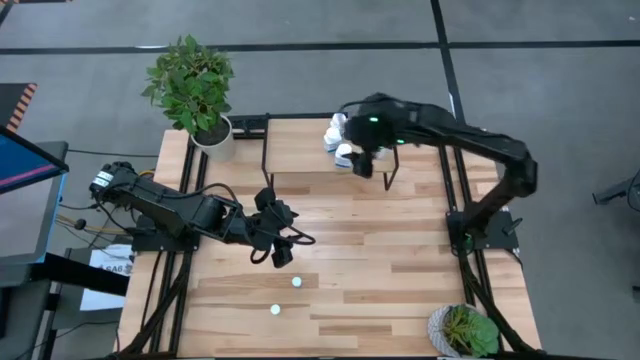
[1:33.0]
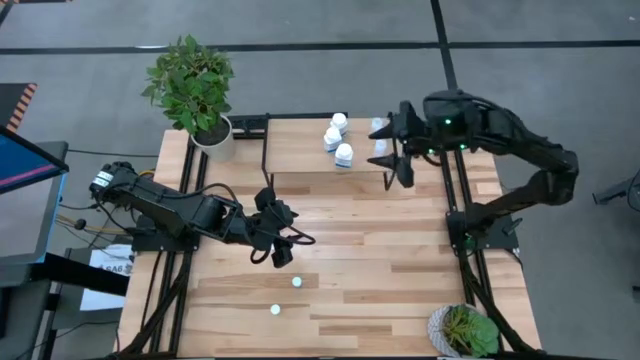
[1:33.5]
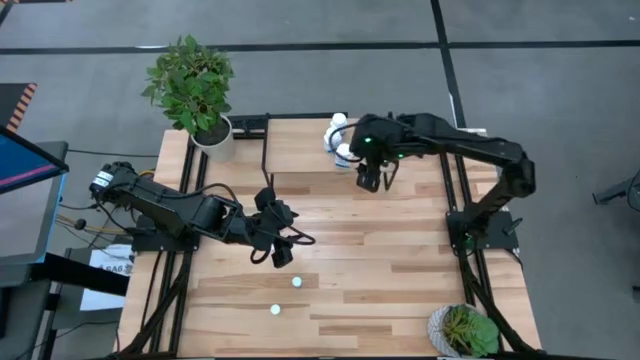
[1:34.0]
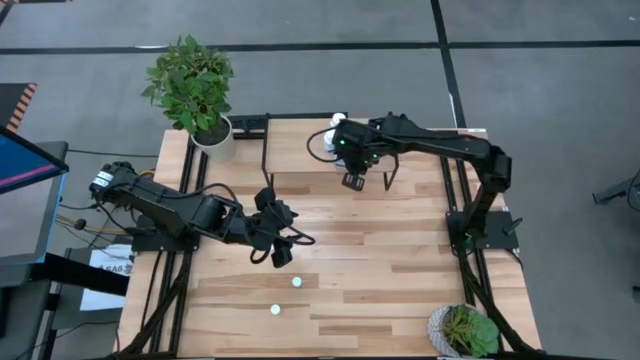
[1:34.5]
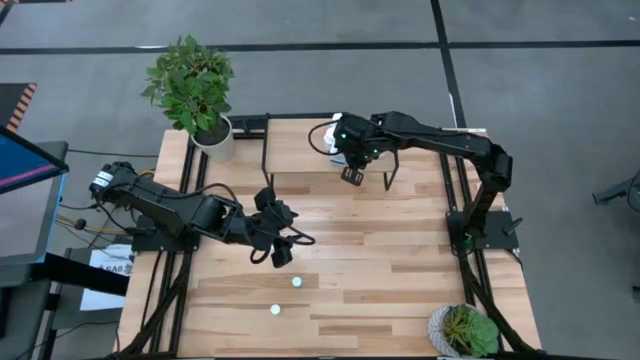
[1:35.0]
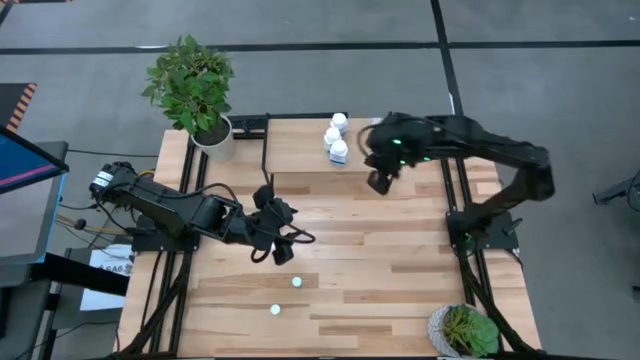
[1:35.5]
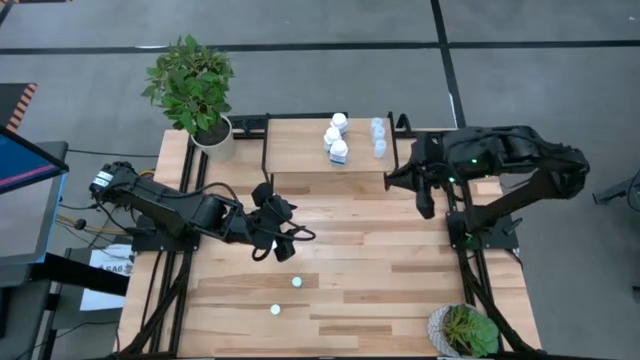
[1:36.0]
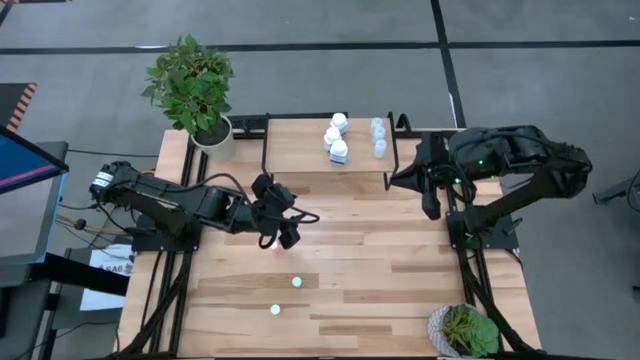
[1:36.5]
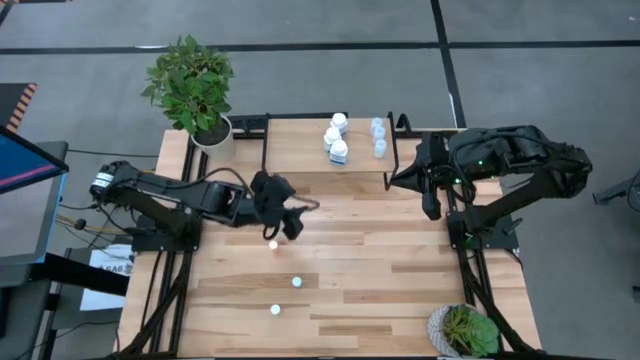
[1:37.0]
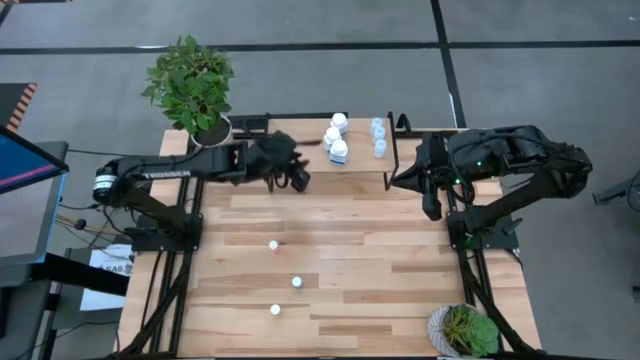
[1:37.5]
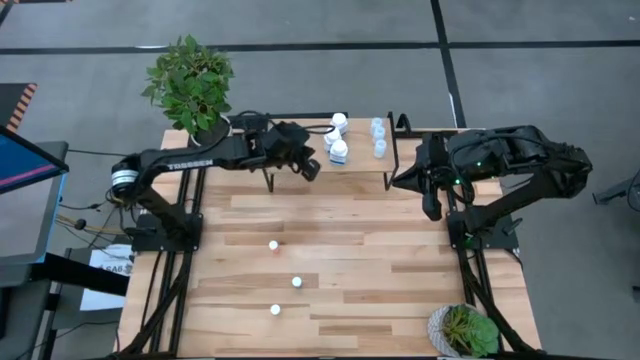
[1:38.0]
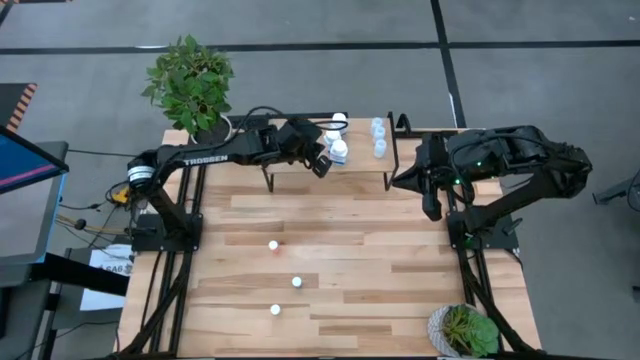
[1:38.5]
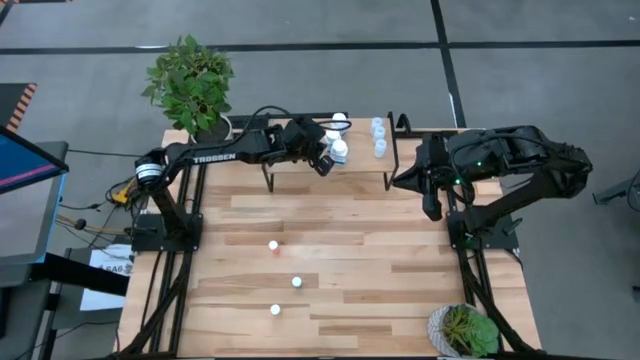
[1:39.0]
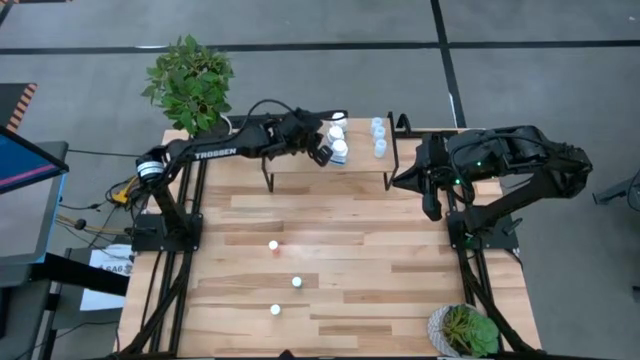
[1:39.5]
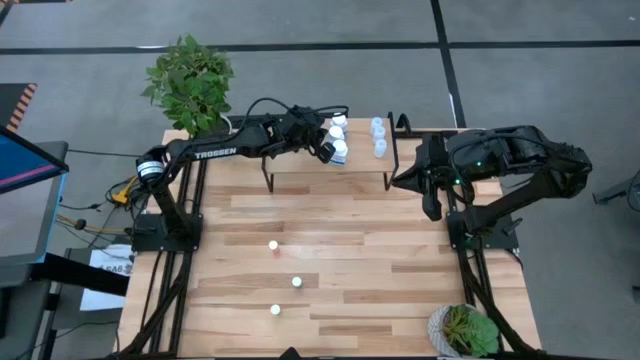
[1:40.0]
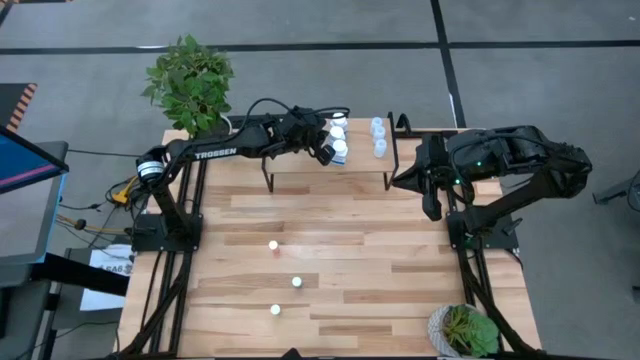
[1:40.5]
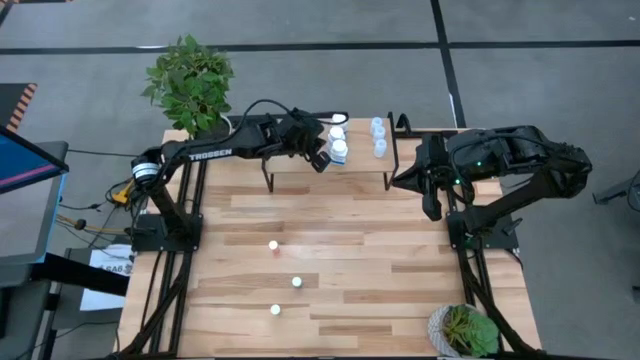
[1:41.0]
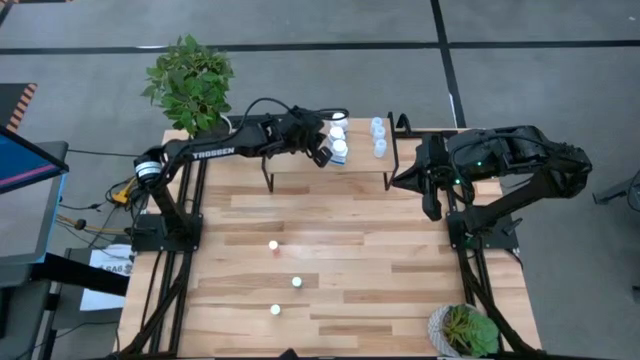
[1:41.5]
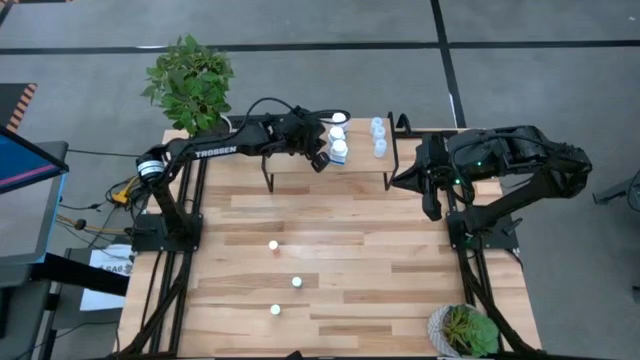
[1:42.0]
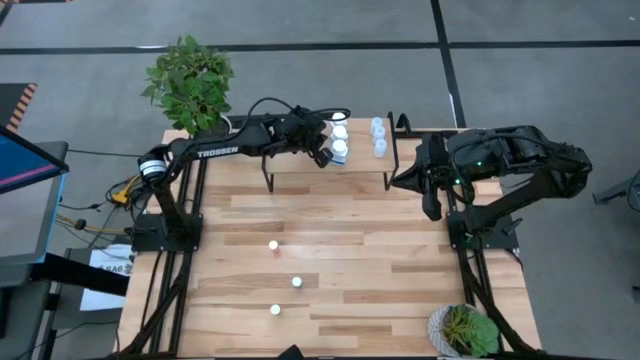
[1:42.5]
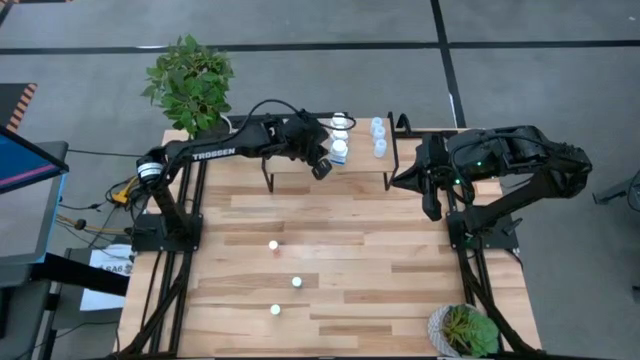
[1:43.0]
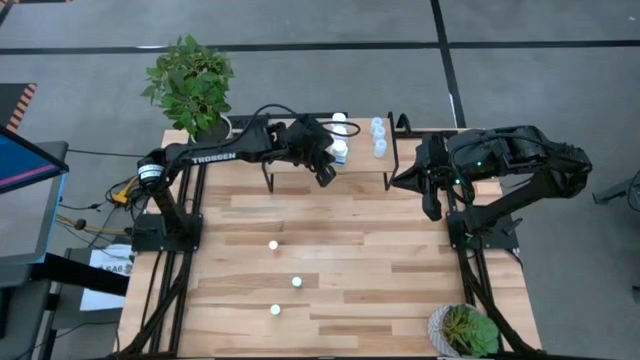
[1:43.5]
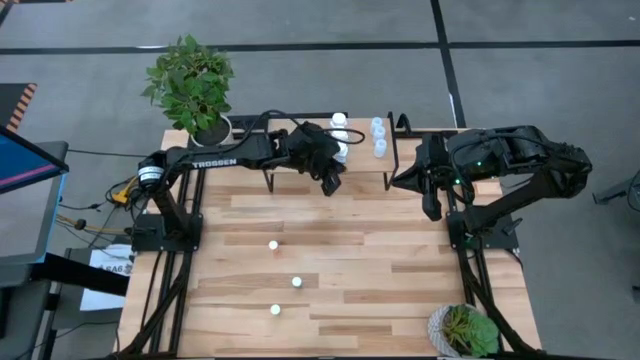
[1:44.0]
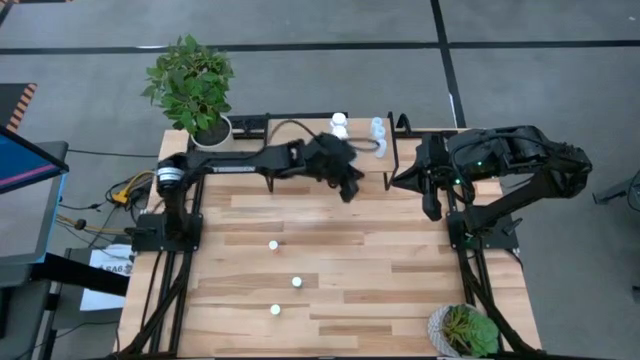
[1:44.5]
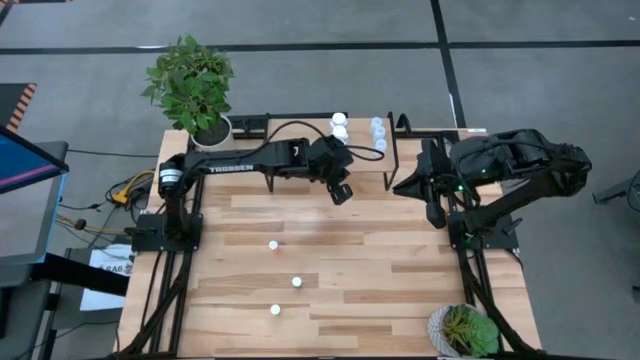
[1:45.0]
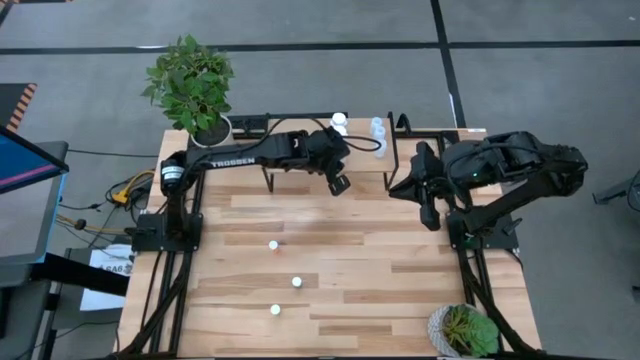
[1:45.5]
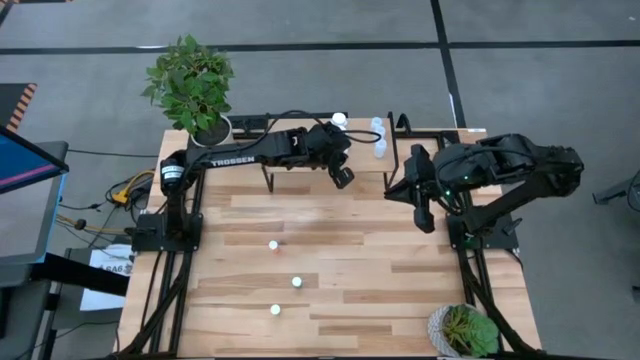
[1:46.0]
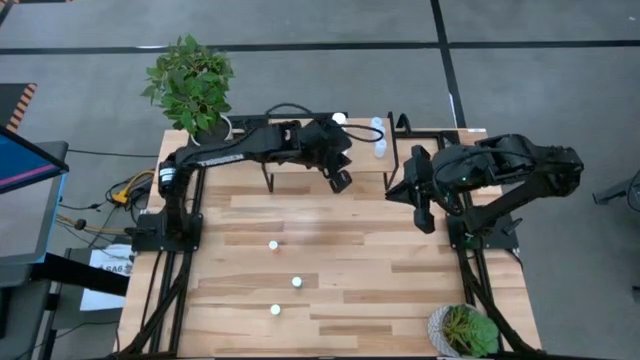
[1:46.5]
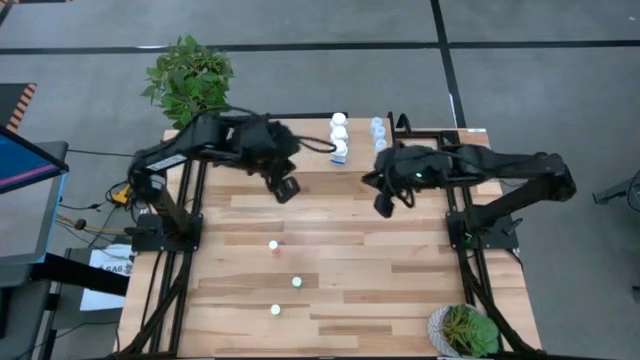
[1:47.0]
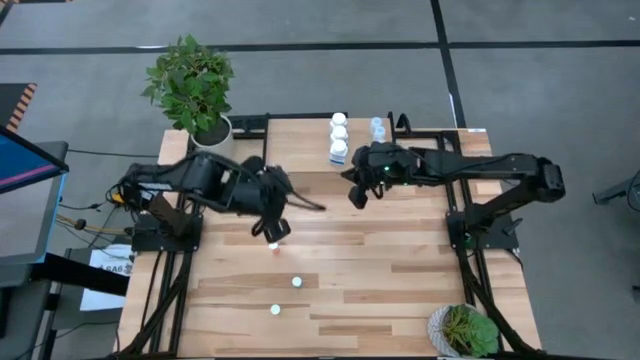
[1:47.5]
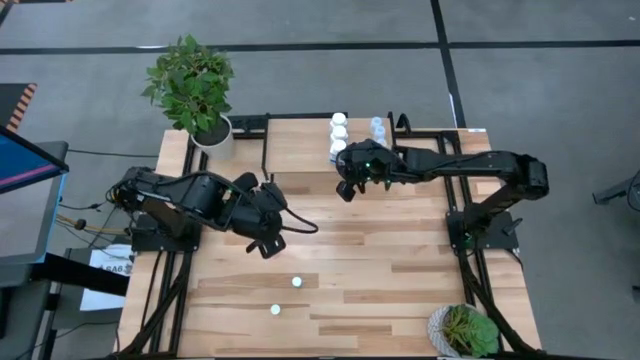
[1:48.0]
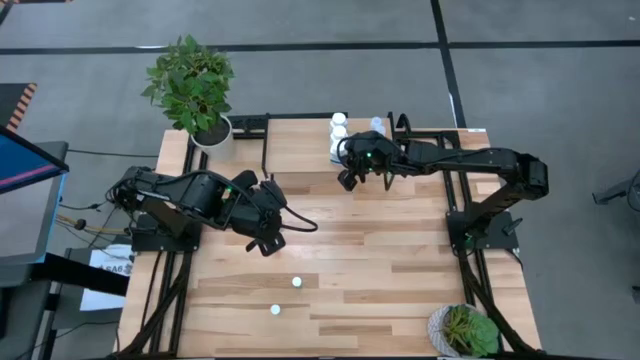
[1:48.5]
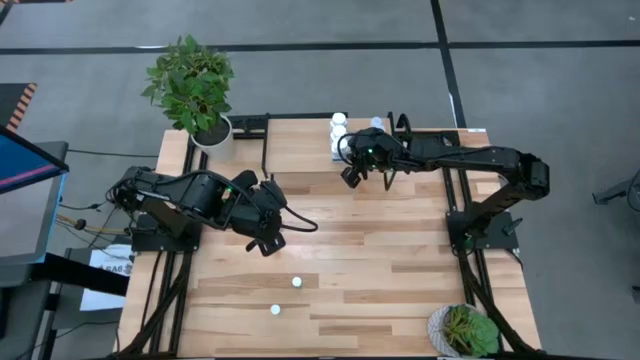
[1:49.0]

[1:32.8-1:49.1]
Task: Pick and place medicine bottles onto shelf by color
Adjust the white medicine bottles on the shelf

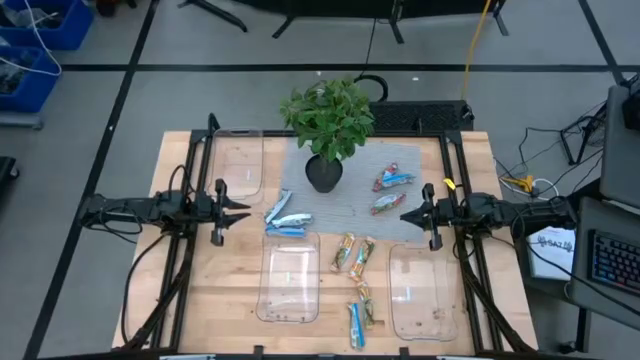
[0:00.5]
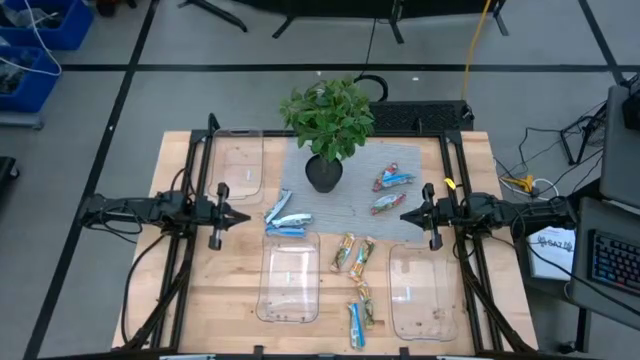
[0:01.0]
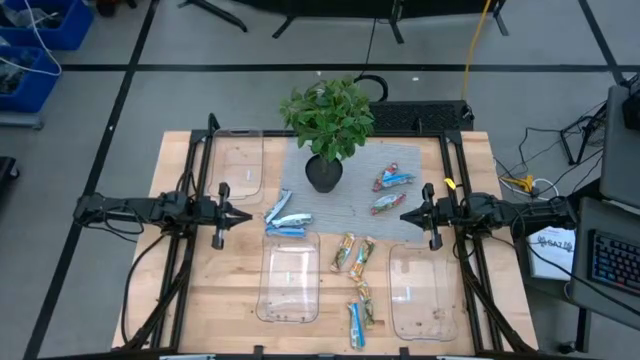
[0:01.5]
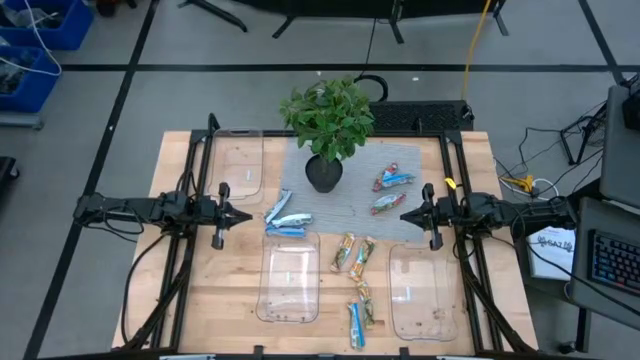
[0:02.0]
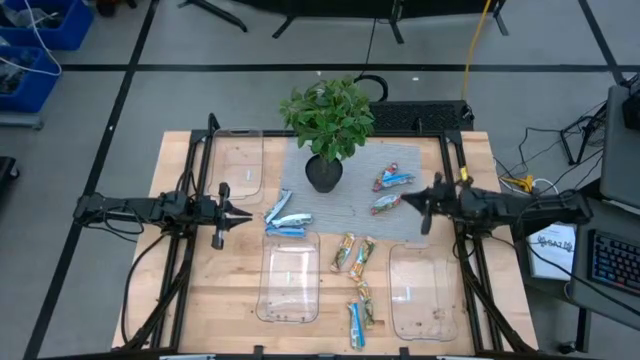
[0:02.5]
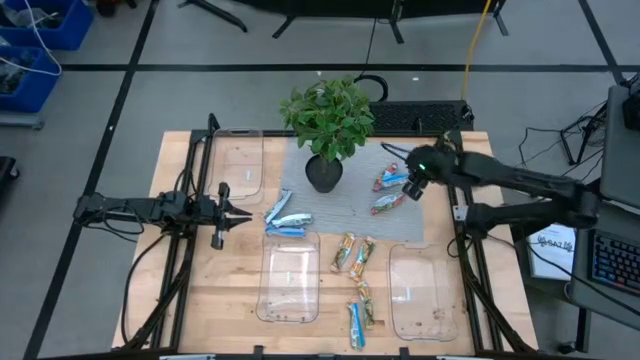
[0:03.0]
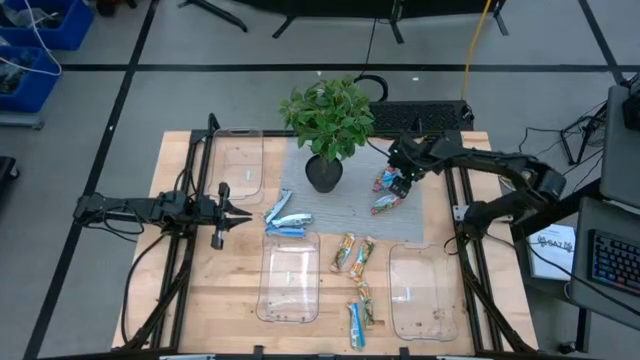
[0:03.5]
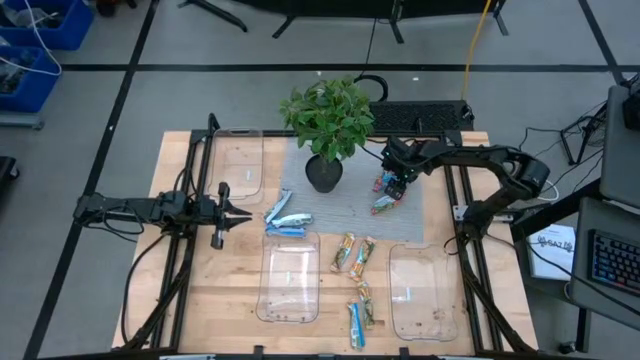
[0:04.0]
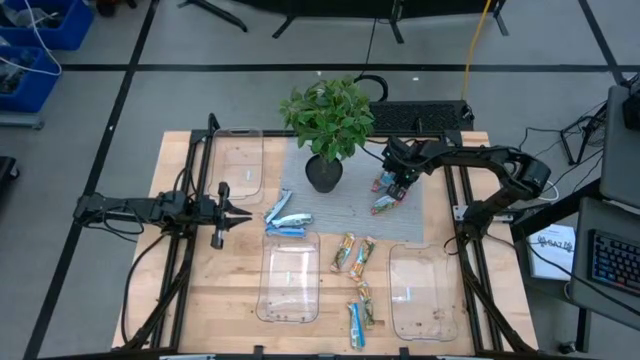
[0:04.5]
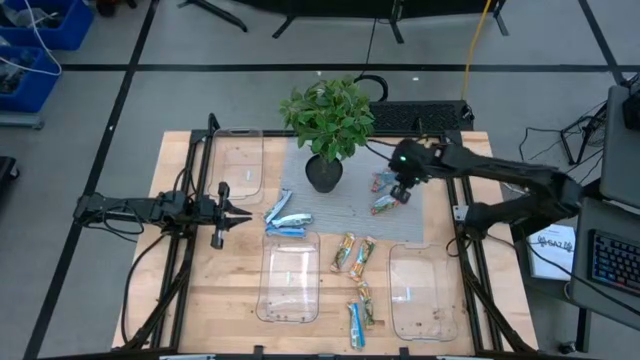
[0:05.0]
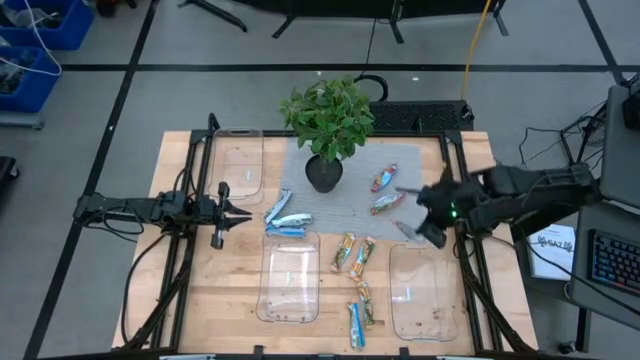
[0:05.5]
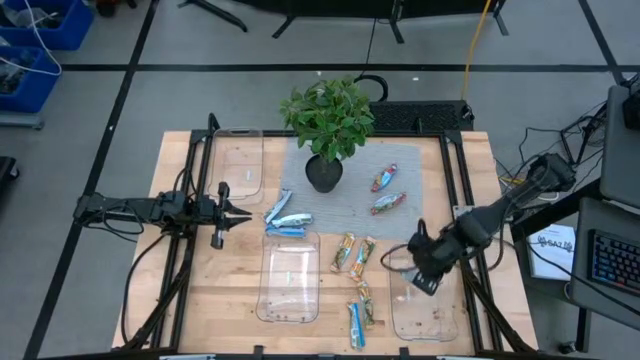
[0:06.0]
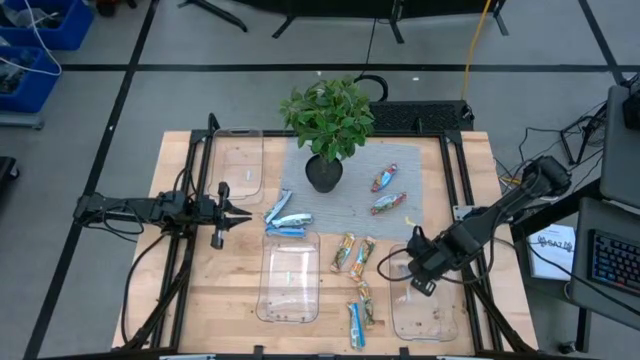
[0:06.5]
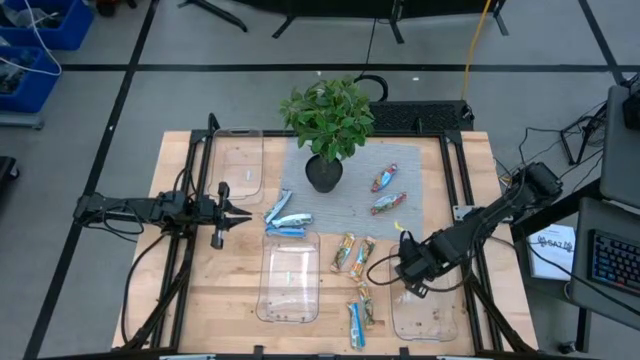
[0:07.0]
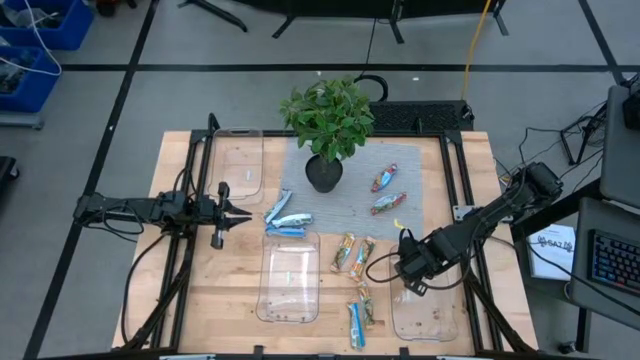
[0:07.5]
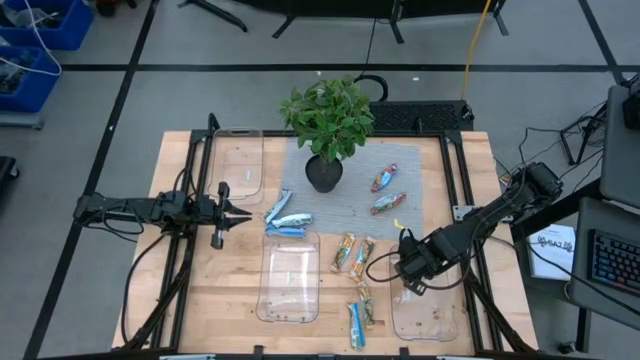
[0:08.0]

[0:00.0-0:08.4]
Task: Pick and place Granola Bars by type
Put the red granola bar into the bottom right transparent bin
